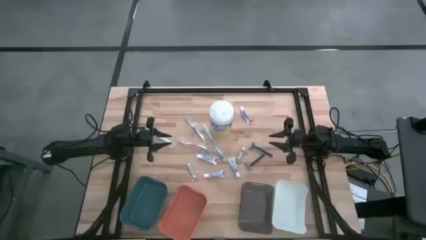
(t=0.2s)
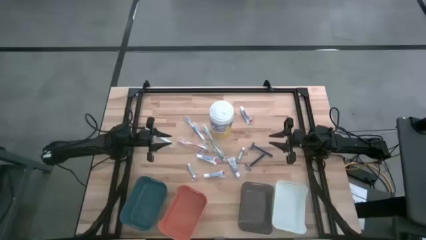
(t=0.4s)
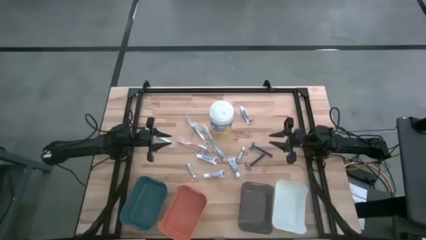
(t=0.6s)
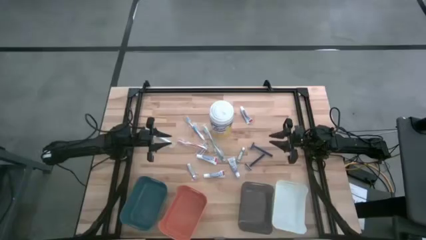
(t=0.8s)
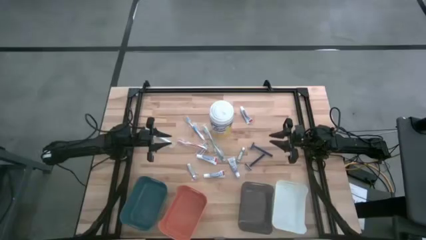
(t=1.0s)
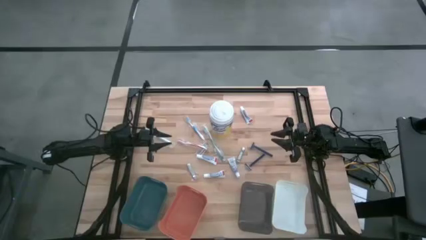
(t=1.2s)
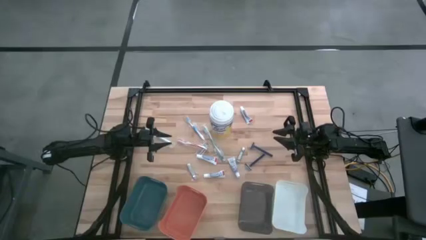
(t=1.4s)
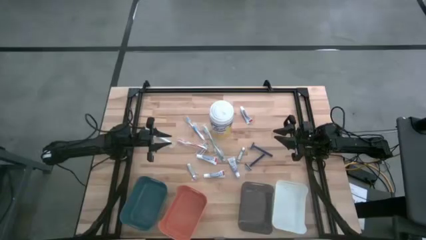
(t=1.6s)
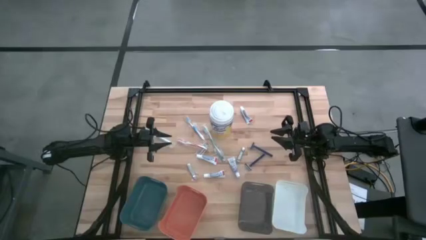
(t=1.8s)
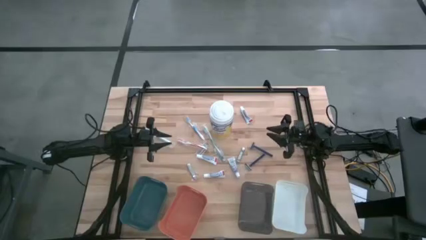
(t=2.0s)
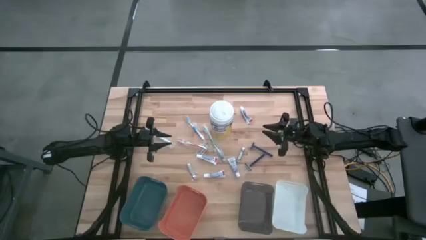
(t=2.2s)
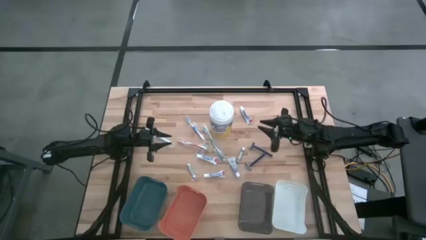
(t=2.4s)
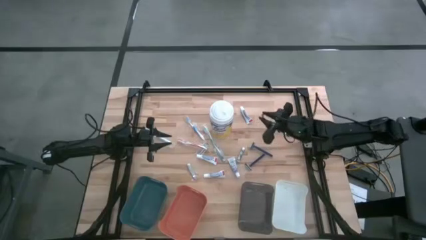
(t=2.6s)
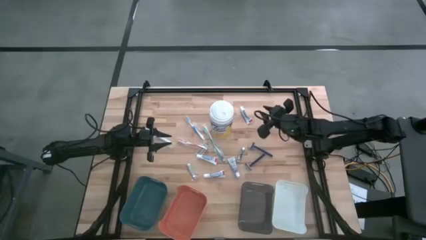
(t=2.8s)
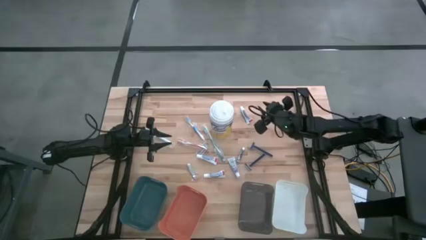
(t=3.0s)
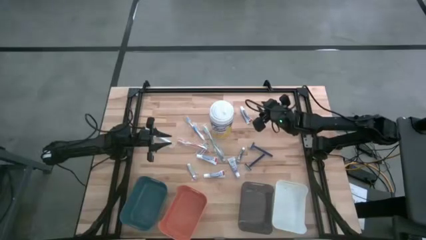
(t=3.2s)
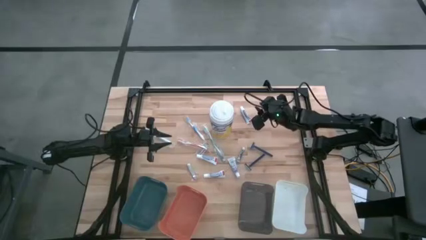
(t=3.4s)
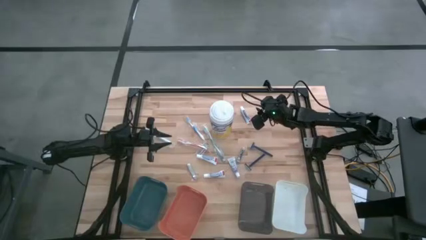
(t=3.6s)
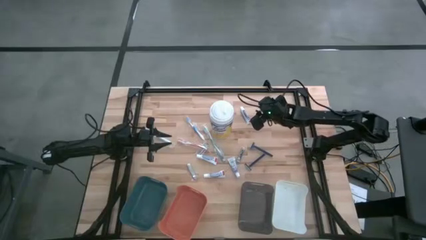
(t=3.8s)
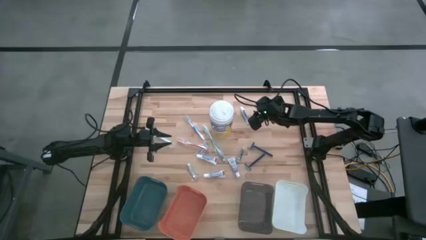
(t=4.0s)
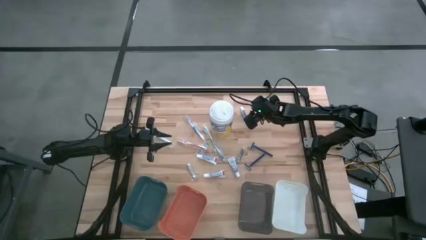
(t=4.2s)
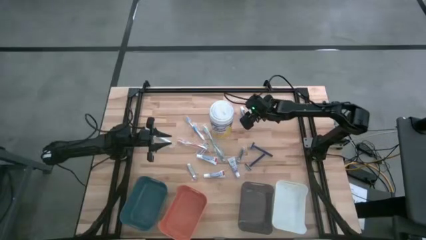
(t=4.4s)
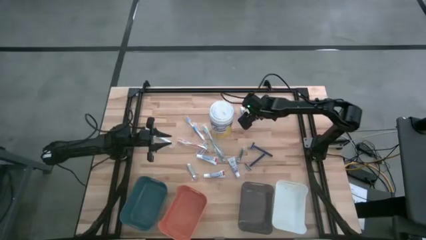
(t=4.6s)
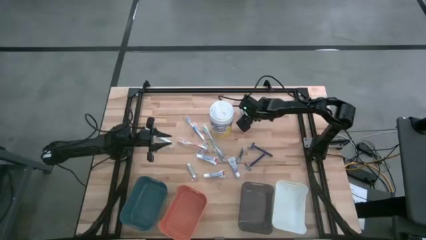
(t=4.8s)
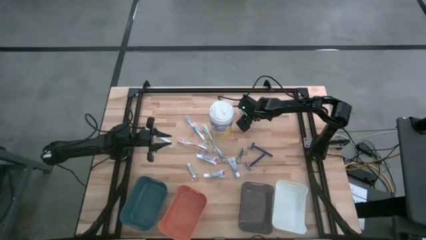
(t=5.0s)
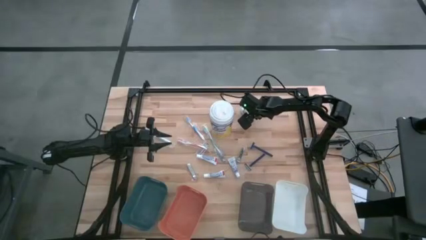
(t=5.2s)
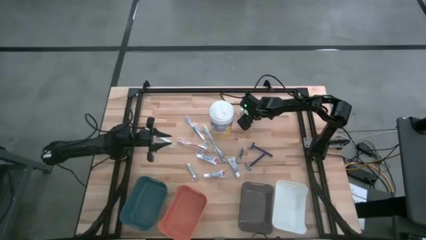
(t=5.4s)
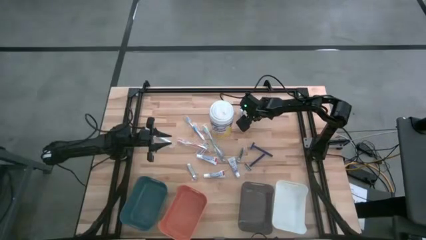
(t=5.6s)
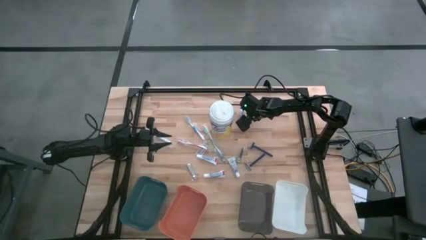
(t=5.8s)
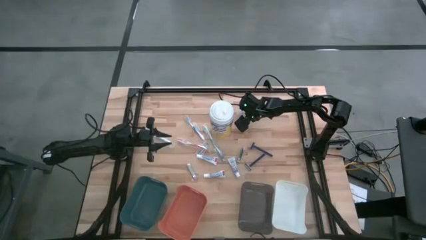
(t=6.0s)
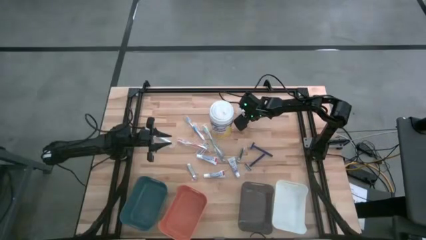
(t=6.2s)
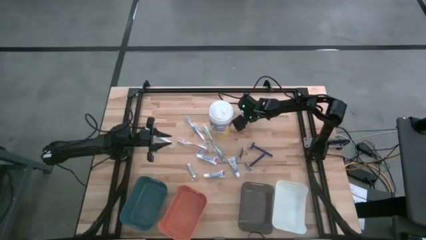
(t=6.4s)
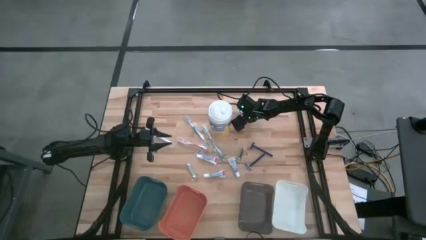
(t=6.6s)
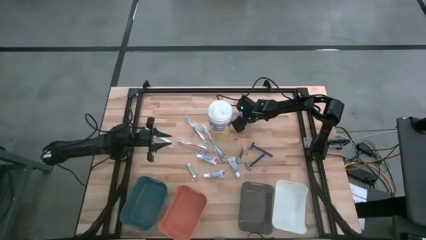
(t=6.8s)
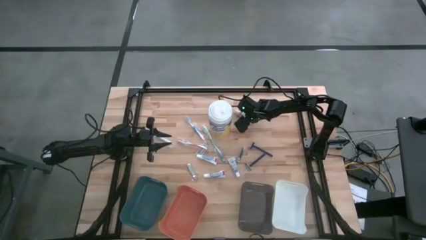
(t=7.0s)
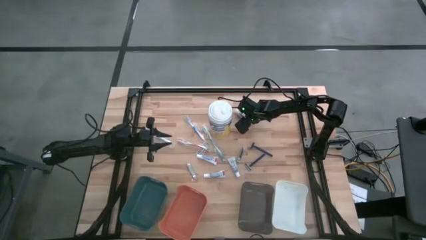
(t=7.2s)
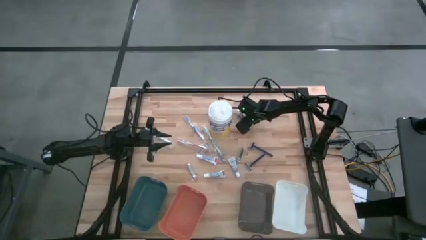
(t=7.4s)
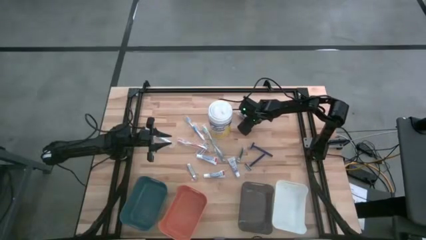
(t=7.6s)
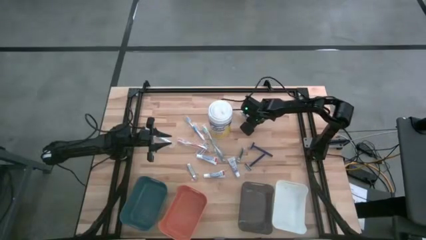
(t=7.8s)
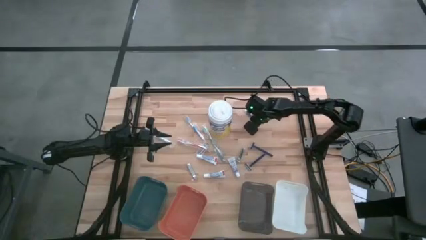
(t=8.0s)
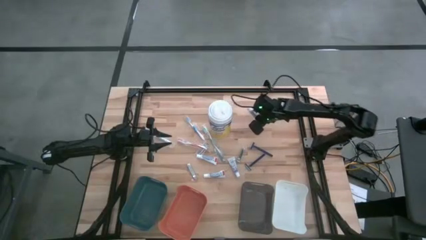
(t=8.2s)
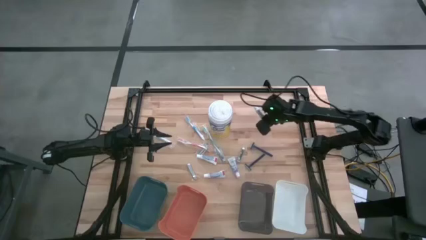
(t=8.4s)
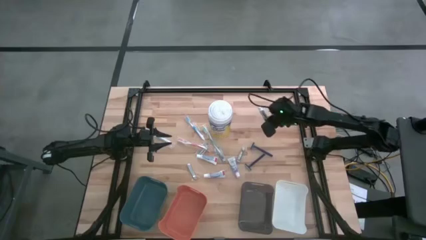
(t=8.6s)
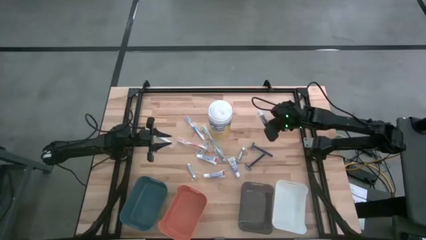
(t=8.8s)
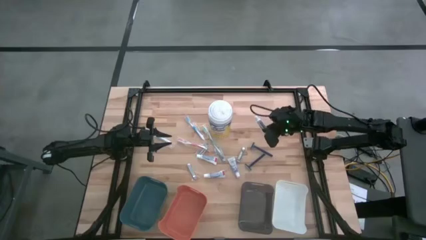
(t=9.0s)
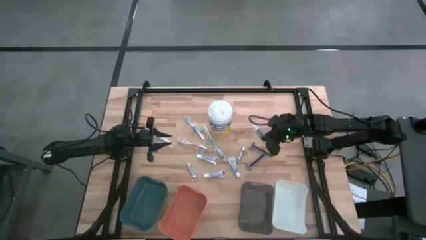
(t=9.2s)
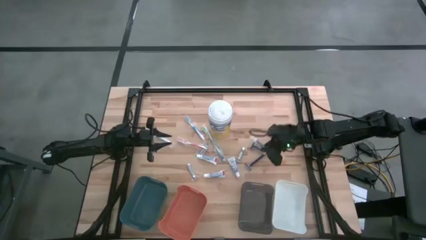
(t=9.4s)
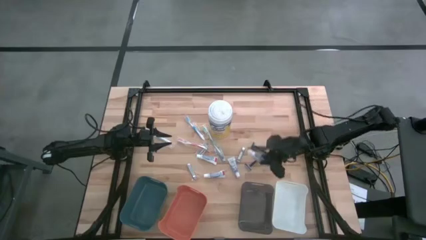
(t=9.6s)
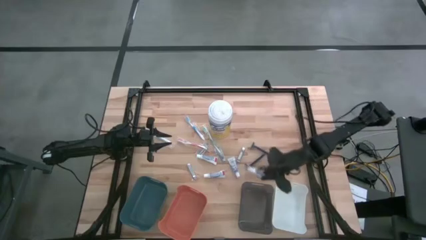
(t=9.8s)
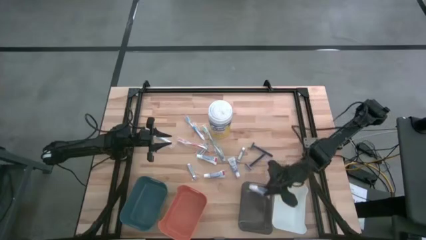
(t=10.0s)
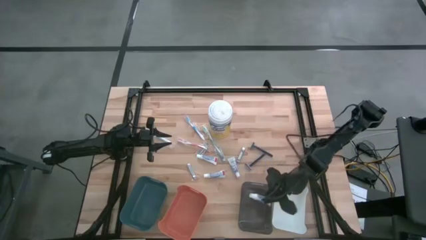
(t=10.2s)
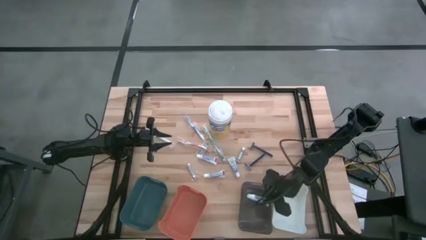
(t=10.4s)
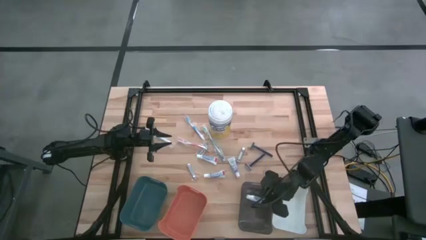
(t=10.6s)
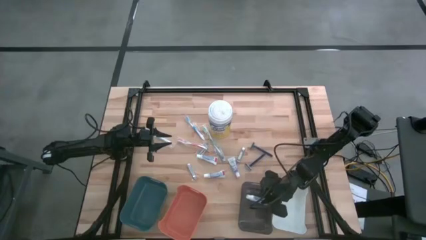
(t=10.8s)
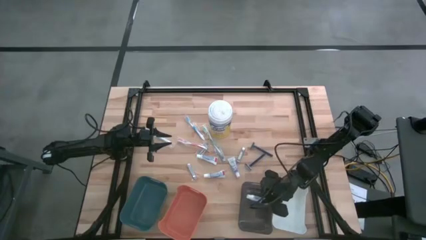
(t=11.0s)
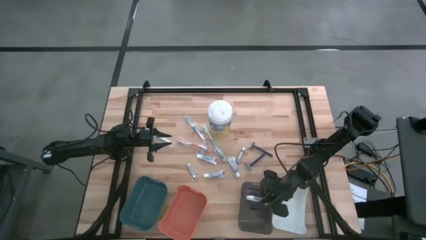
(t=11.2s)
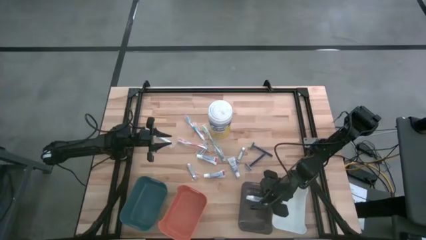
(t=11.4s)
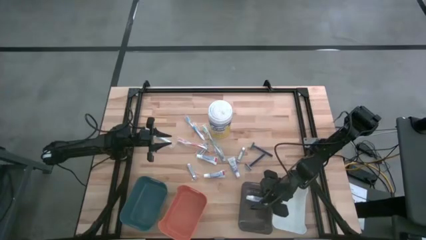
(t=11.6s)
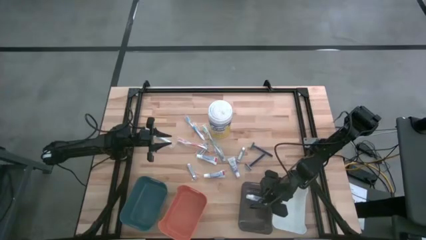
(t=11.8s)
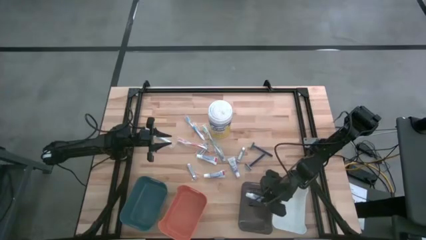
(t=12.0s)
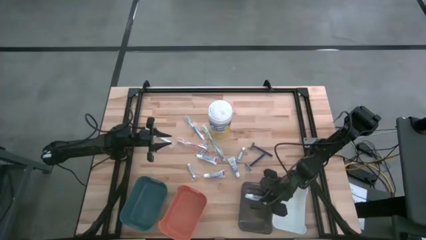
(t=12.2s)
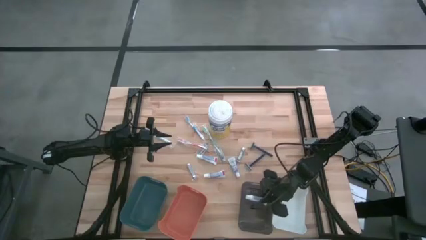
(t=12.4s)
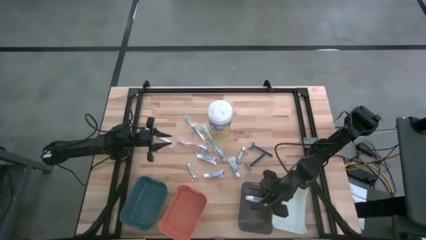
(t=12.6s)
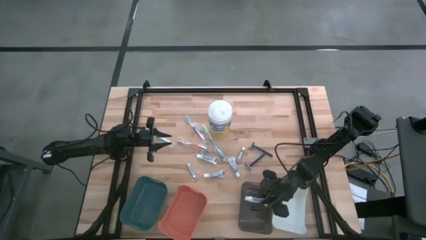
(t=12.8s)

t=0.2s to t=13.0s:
Task: Pick & Place Travel size toiletries
Put the white toothpaste into the black bin
